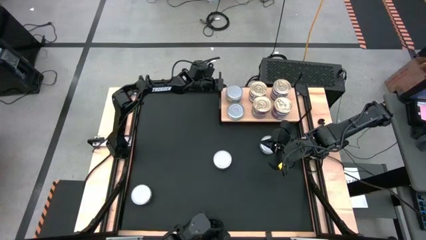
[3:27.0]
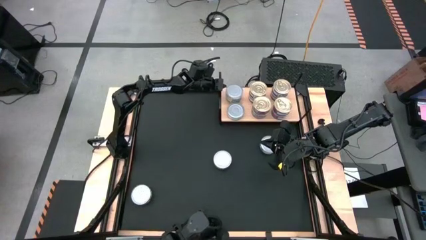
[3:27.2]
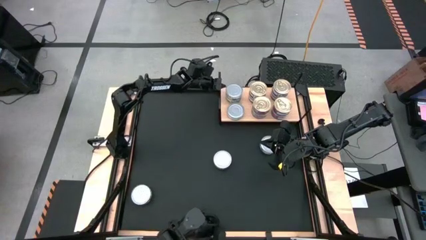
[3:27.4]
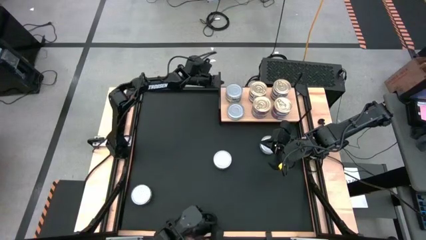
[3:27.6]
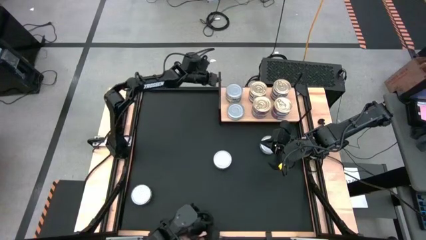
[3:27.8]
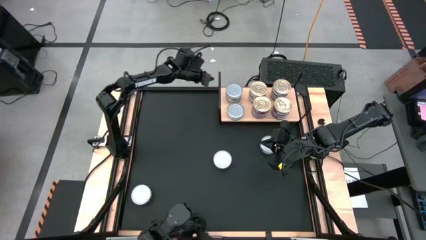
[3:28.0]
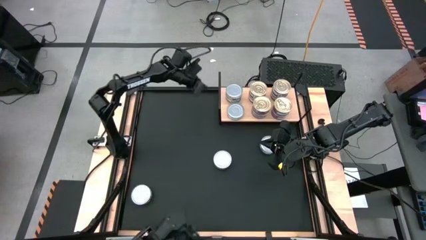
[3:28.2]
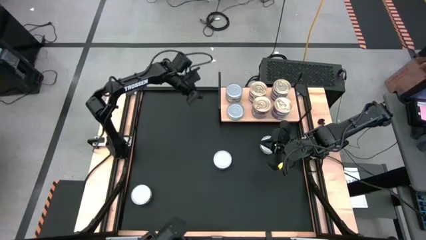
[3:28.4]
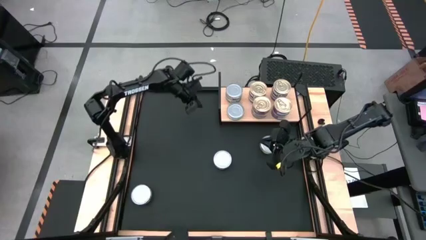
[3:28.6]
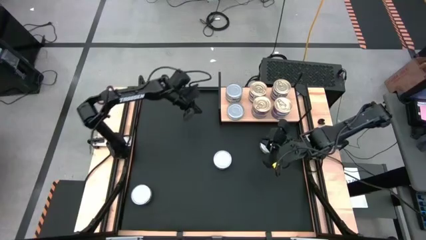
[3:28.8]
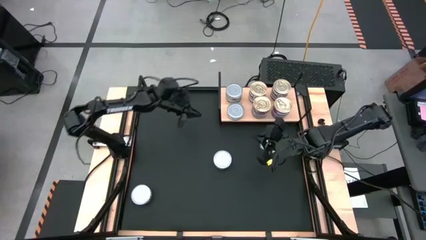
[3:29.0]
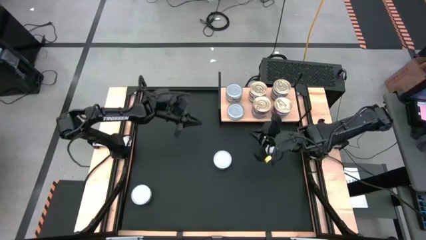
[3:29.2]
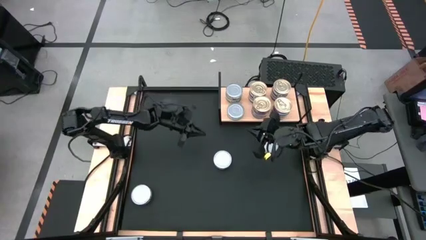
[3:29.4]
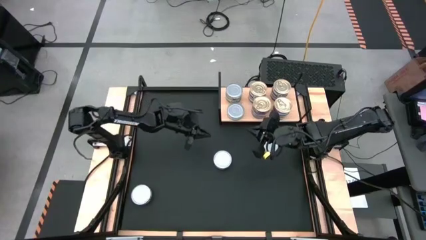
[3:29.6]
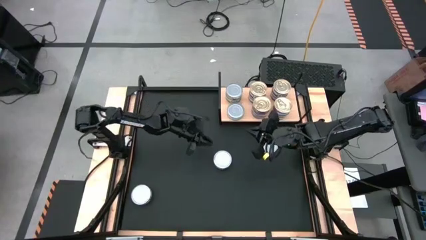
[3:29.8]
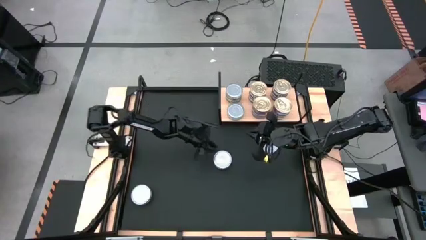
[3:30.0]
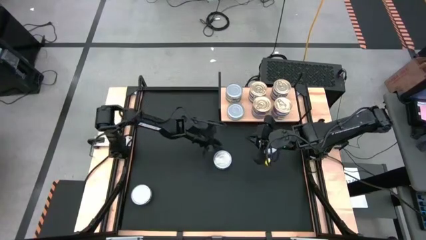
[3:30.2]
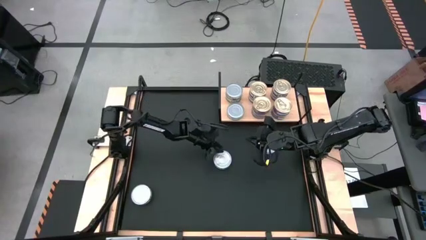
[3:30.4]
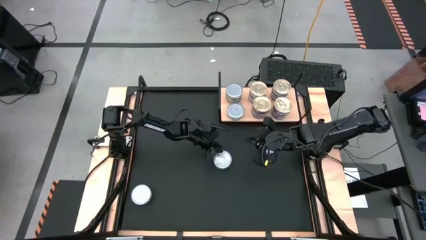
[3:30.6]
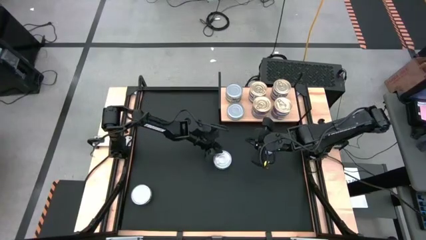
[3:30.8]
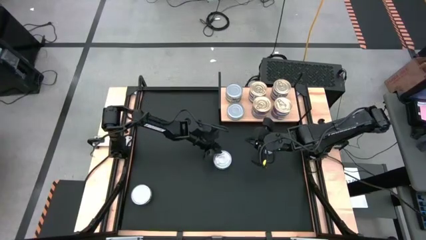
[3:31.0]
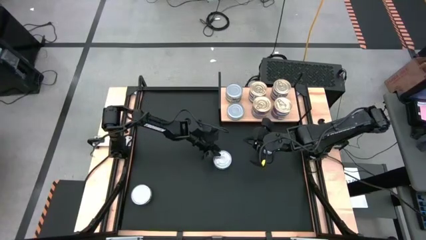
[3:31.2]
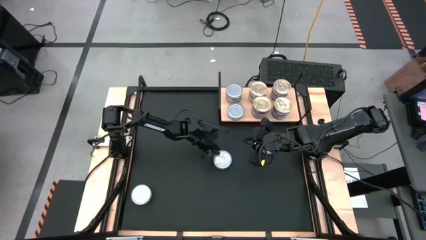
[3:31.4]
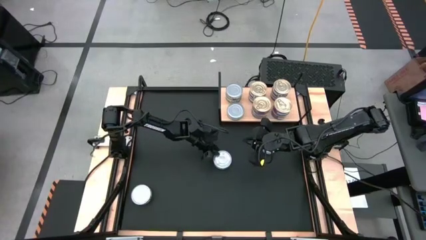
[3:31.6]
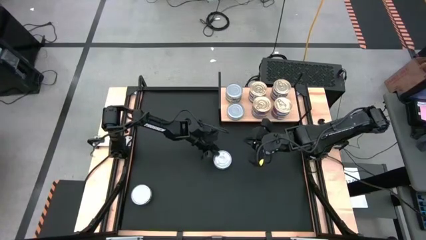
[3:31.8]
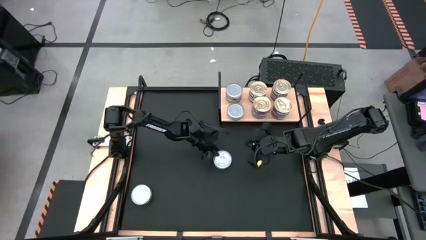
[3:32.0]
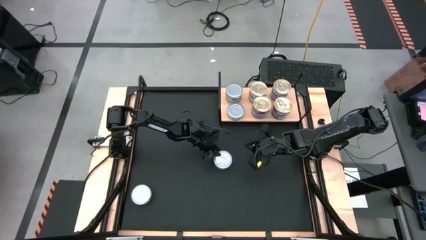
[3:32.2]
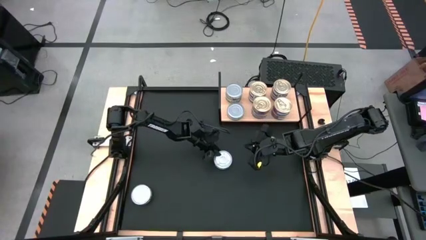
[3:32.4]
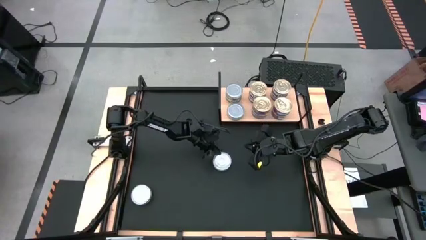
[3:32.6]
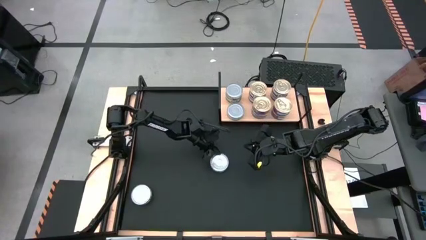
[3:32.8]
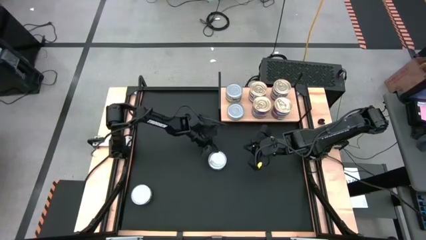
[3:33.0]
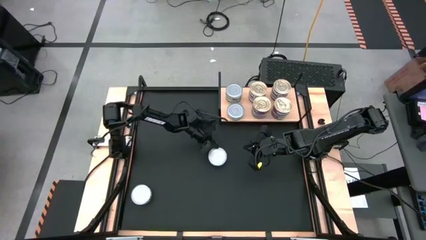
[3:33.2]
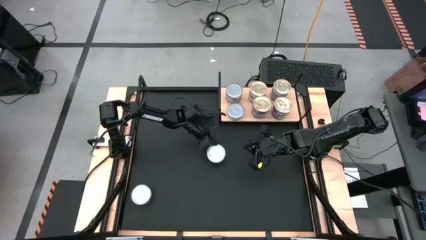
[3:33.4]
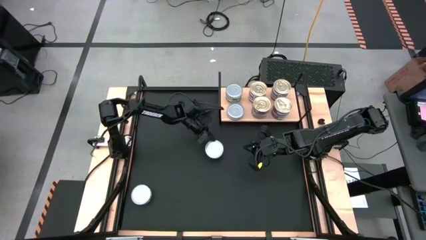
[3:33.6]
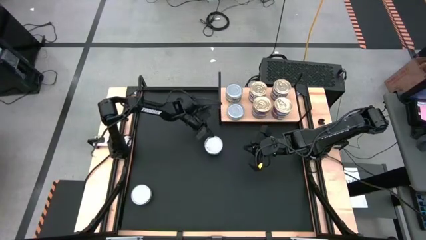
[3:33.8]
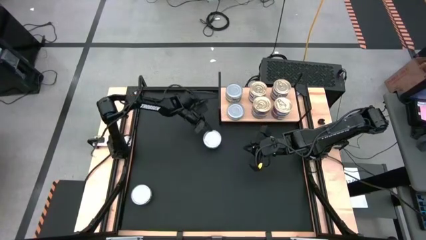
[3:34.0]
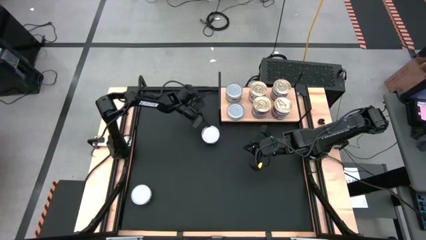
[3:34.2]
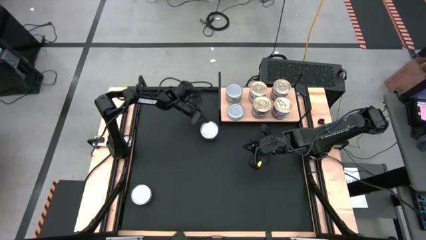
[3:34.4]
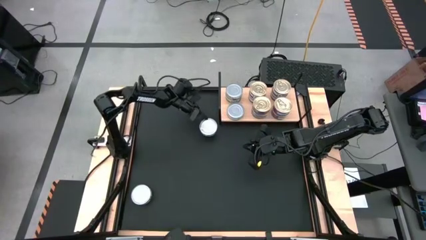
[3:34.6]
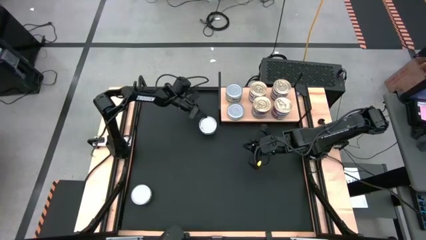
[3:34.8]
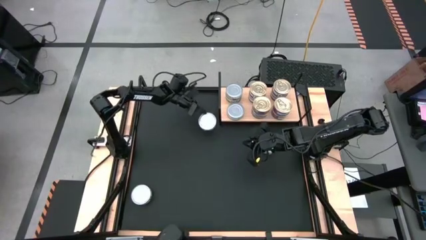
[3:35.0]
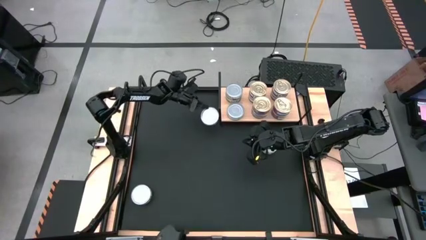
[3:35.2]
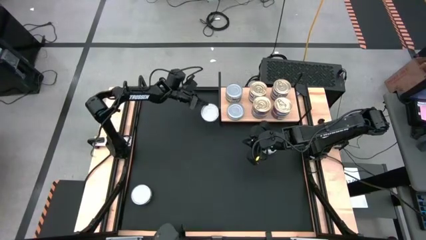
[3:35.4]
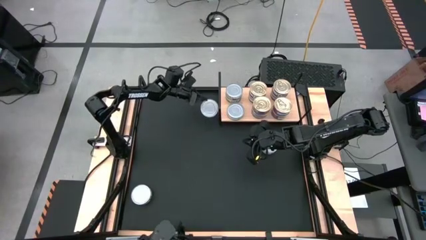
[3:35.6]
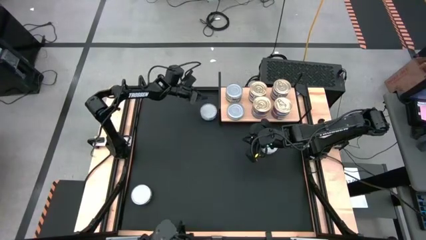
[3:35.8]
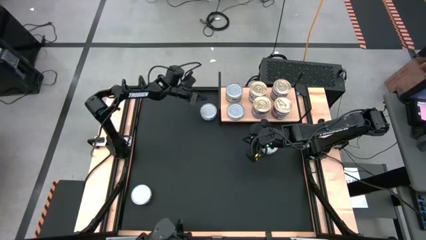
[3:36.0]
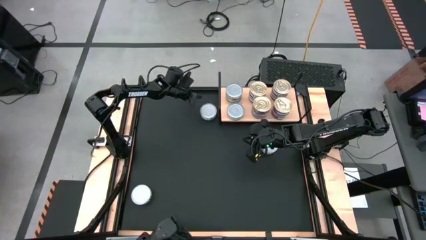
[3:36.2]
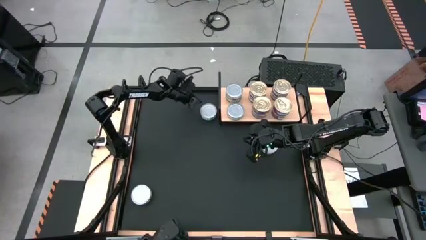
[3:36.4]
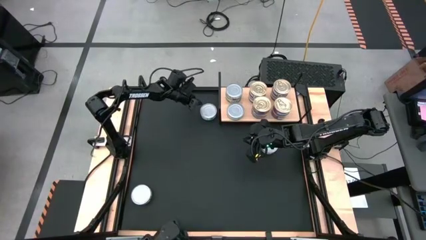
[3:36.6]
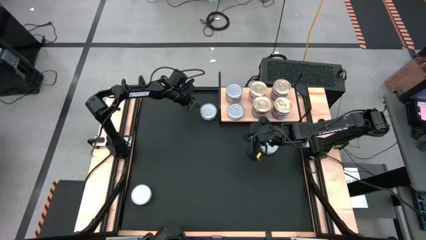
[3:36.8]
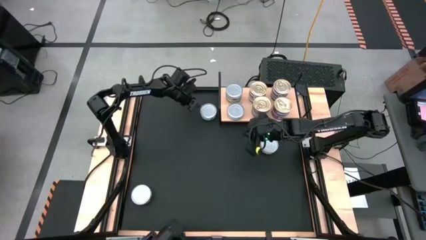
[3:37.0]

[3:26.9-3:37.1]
Task: Stack canned seafood by type on shelf
Stack the green tuna can on top of the other green tuna can on the shelf

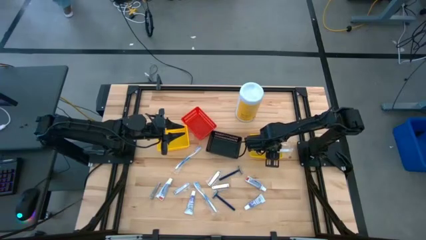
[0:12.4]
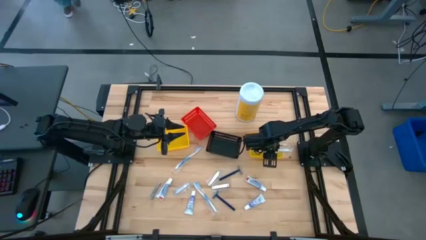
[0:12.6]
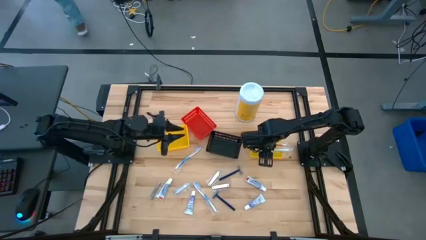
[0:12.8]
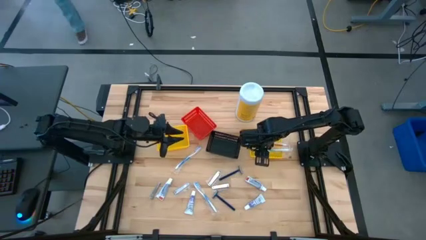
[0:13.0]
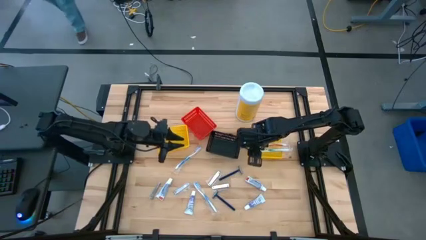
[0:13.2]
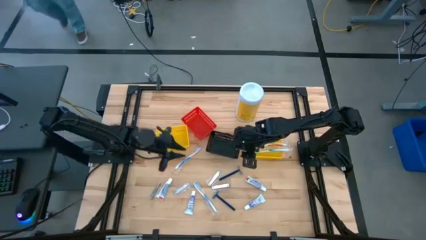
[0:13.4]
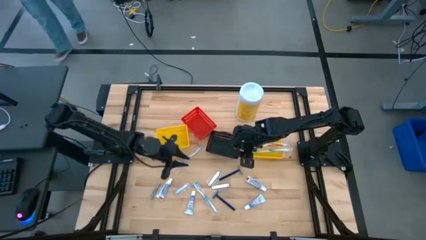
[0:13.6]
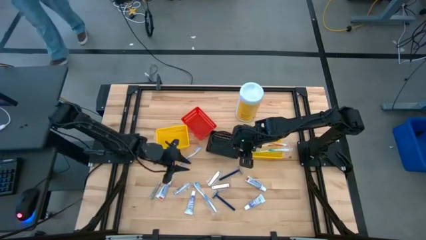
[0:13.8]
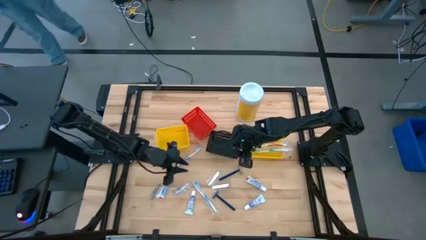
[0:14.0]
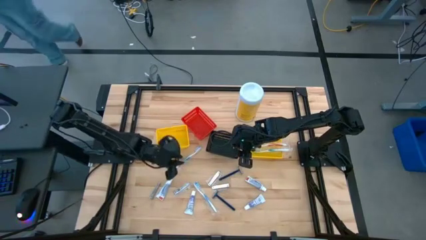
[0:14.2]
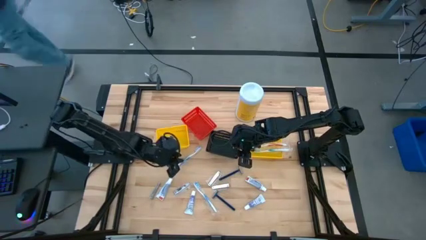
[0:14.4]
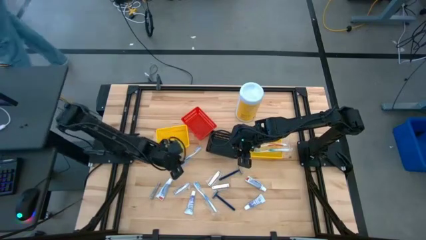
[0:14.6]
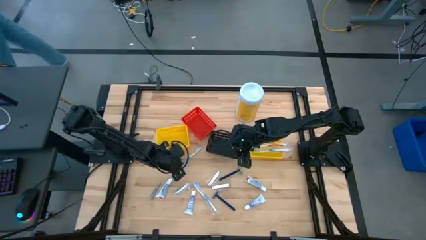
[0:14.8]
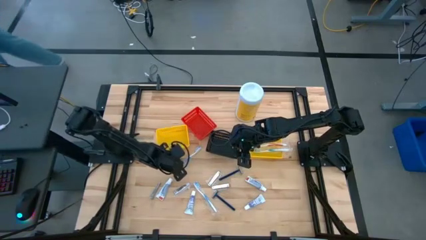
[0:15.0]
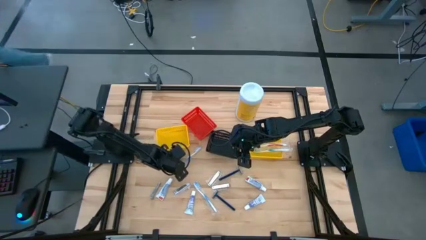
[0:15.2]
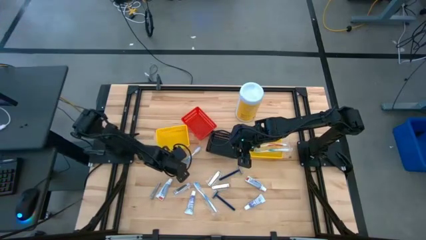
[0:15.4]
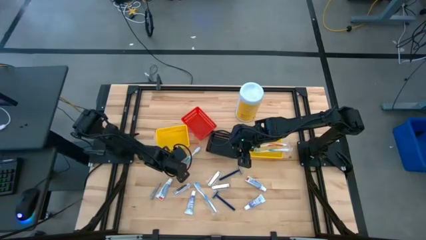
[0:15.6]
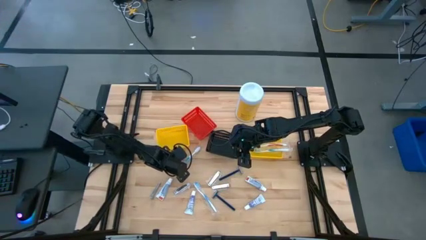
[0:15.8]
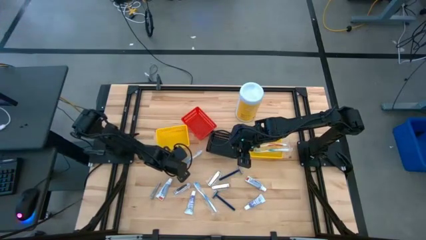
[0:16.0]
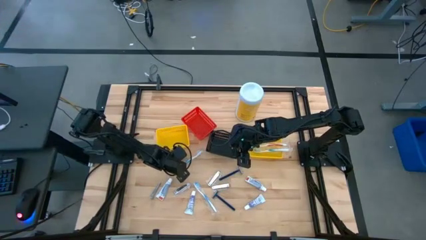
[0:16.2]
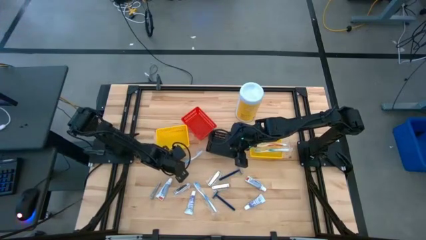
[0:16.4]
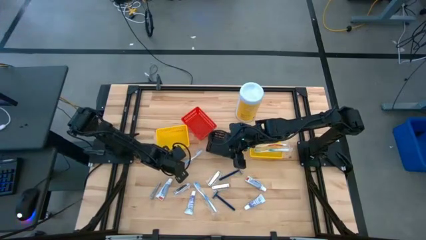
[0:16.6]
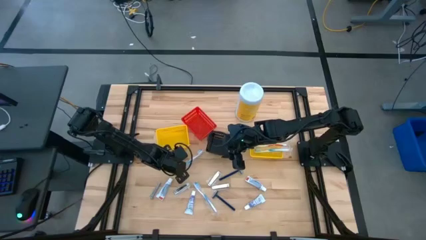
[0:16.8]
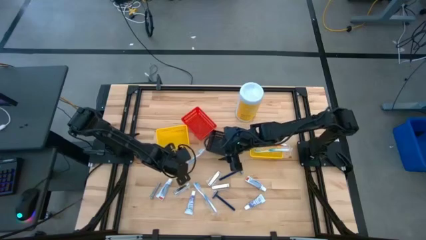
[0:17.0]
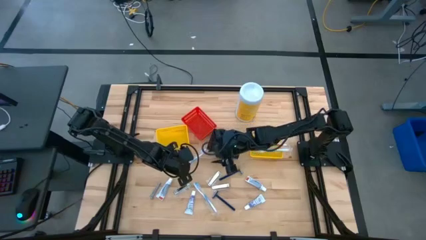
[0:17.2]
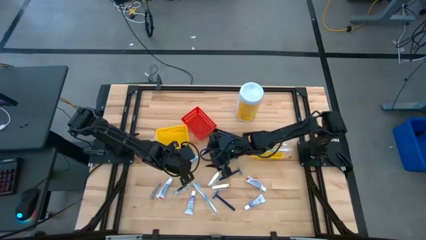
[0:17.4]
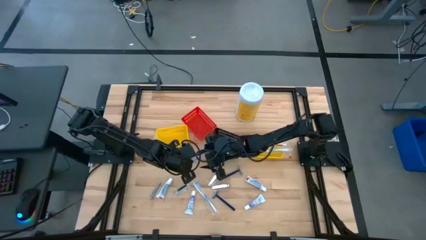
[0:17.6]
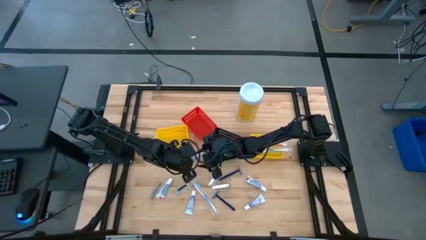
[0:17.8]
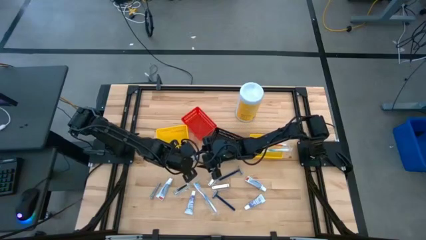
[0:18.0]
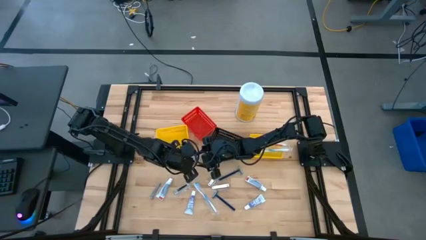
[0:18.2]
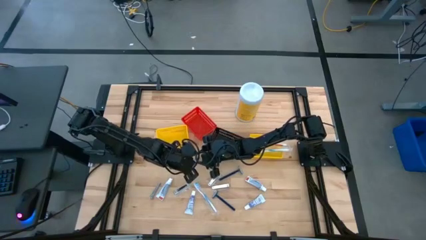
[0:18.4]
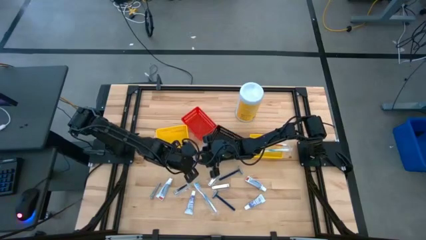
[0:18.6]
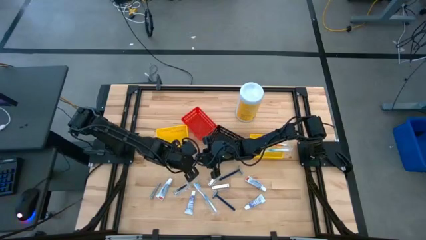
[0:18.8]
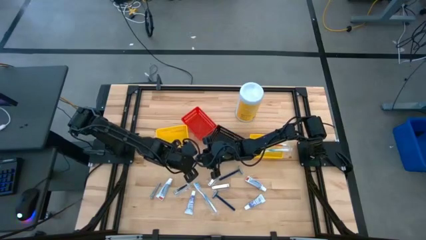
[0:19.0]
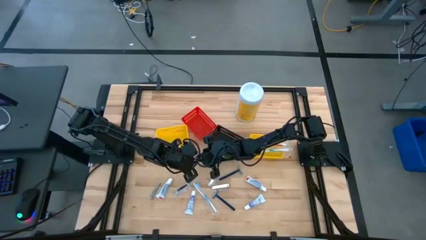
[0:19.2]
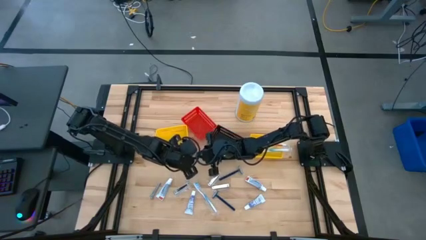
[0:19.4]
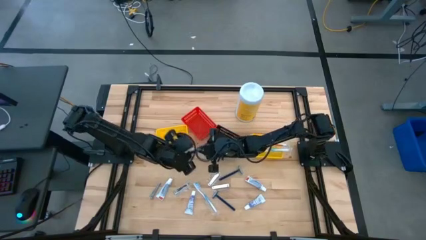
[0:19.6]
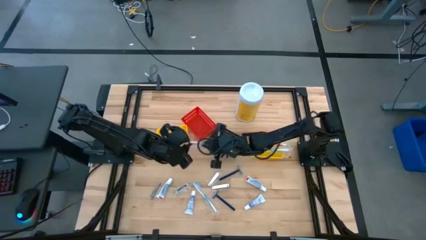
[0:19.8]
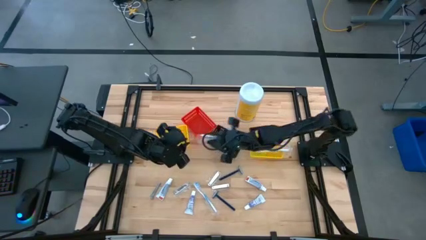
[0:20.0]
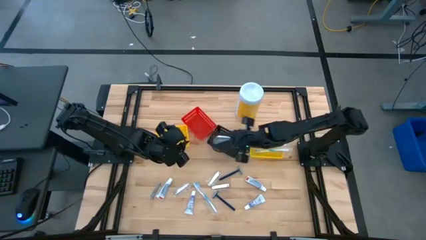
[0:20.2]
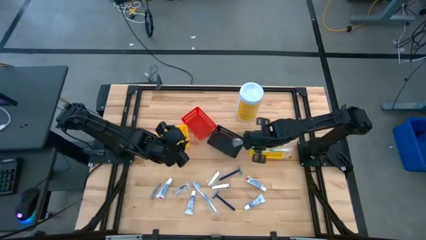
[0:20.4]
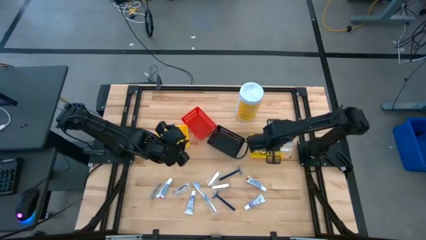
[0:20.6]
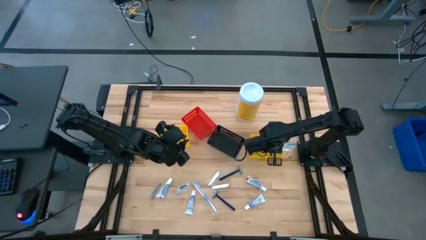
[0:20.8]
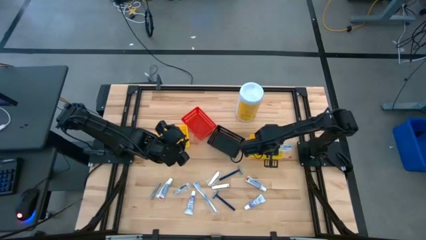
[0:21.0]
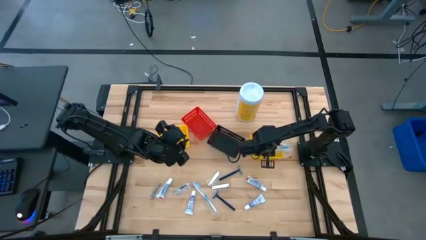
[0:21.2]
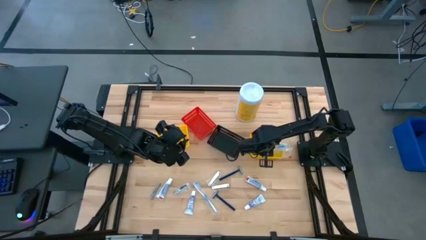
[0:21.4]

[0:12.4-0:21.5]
Task: Pick & Place Travel size toiletries
Put the toothbrush into the right yellow bin
